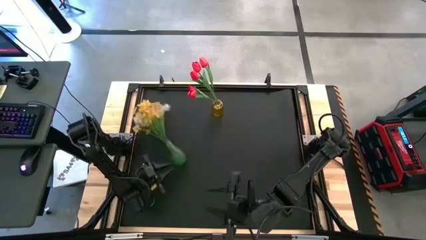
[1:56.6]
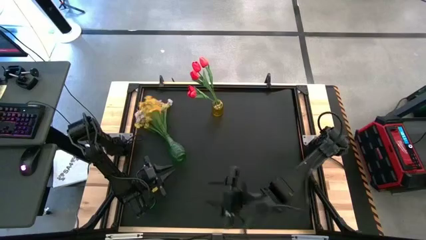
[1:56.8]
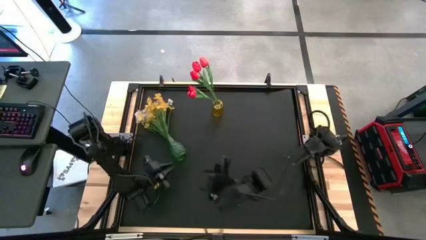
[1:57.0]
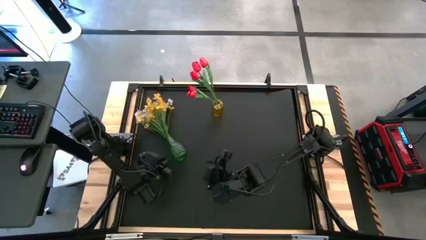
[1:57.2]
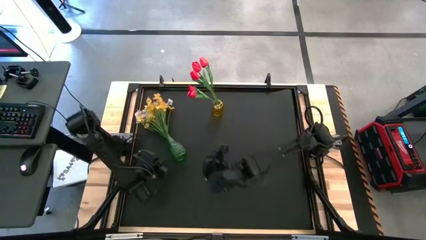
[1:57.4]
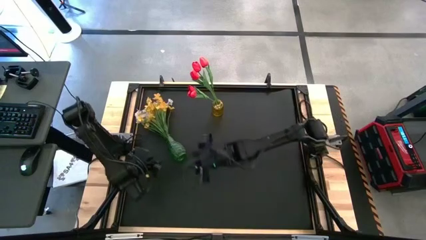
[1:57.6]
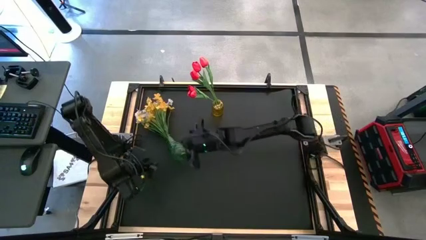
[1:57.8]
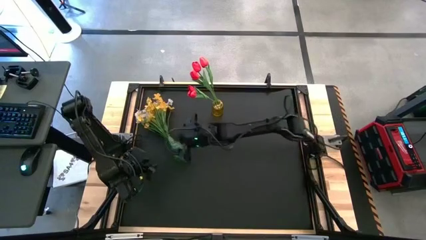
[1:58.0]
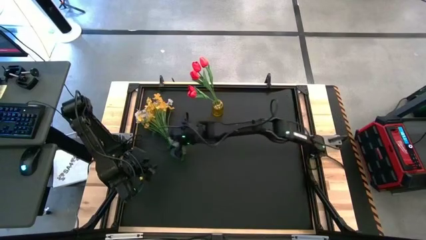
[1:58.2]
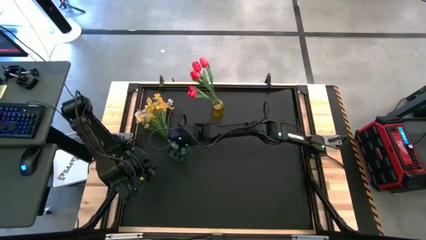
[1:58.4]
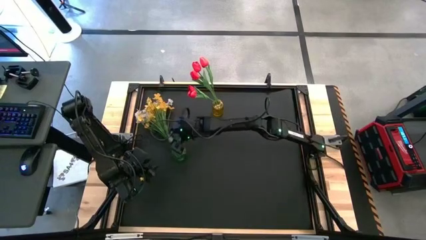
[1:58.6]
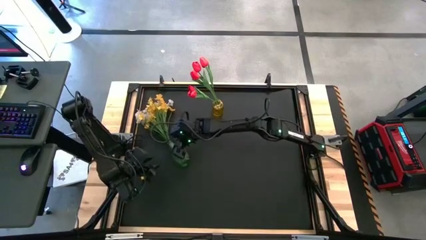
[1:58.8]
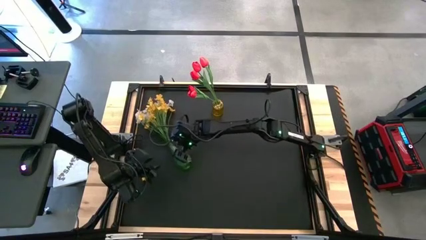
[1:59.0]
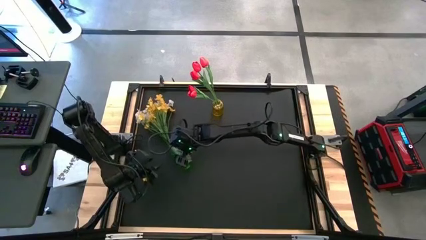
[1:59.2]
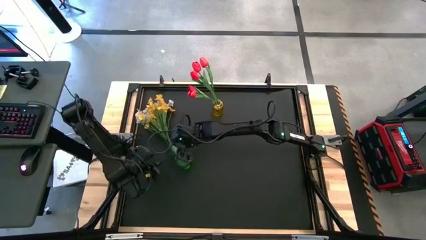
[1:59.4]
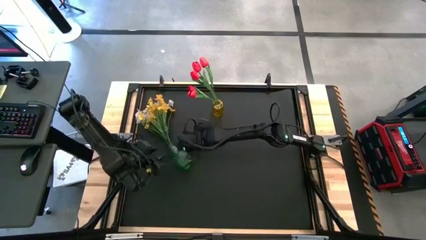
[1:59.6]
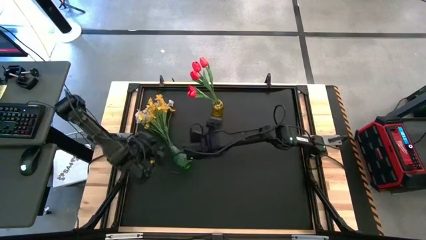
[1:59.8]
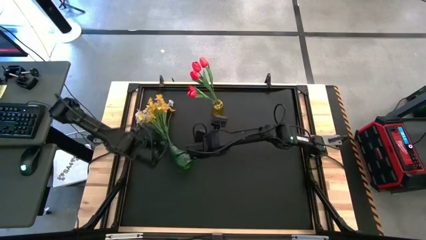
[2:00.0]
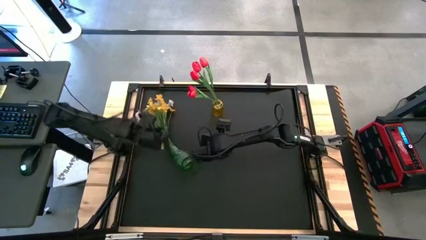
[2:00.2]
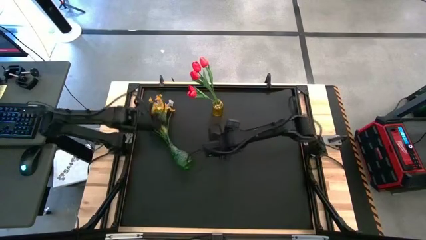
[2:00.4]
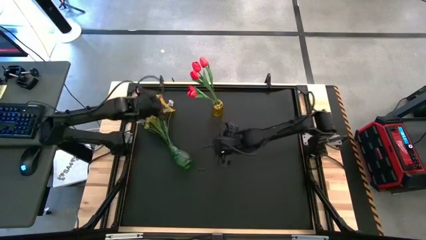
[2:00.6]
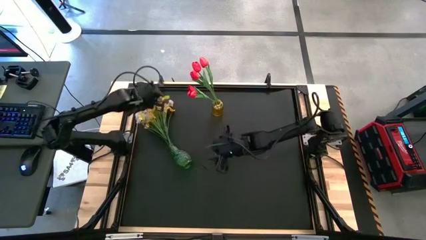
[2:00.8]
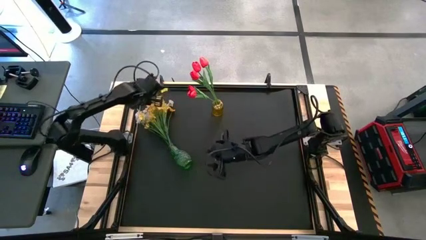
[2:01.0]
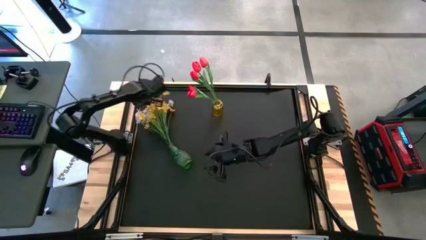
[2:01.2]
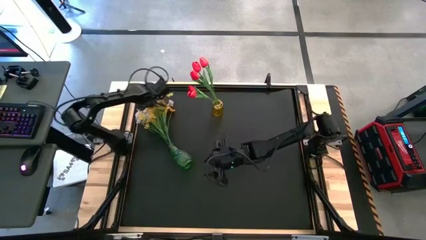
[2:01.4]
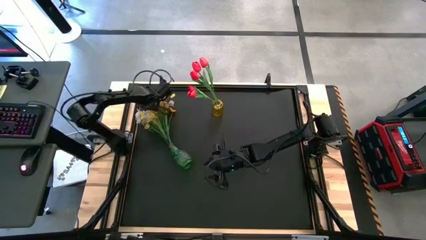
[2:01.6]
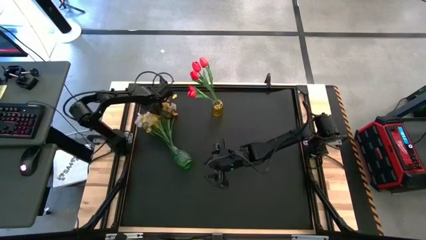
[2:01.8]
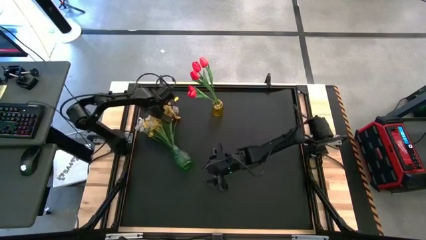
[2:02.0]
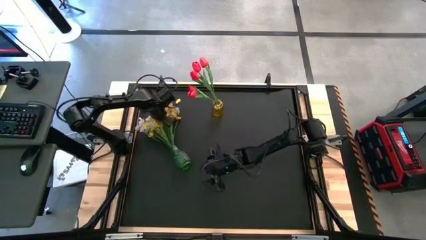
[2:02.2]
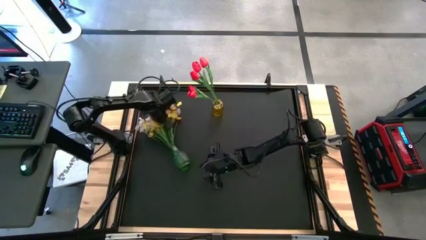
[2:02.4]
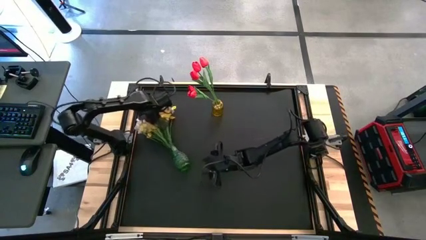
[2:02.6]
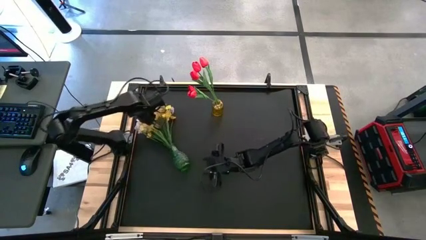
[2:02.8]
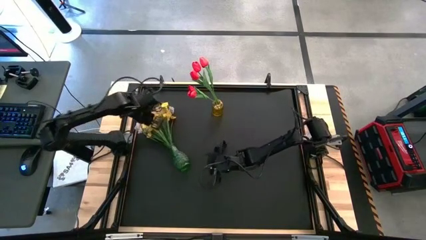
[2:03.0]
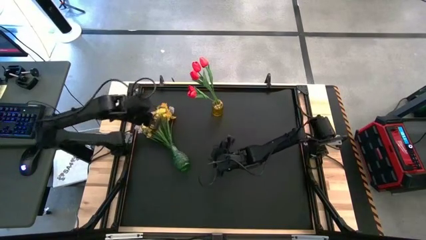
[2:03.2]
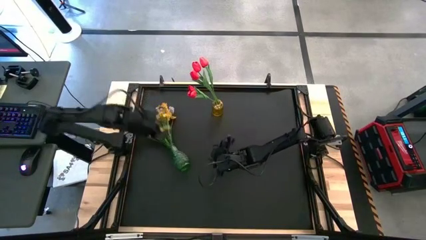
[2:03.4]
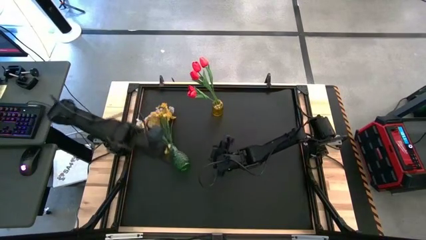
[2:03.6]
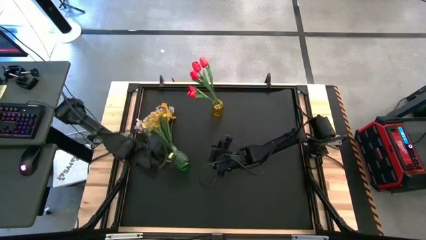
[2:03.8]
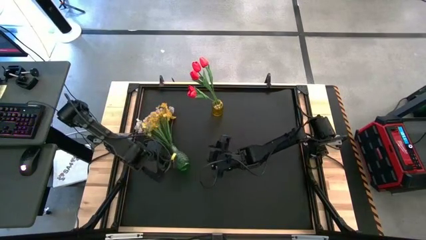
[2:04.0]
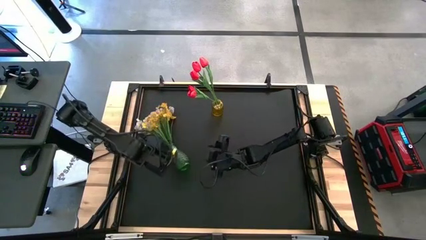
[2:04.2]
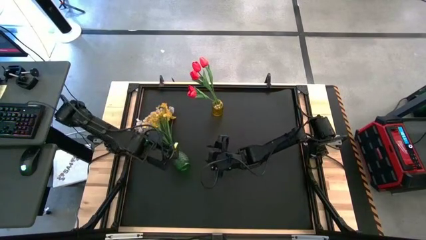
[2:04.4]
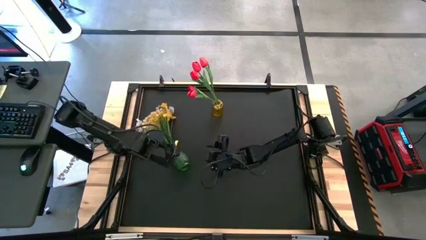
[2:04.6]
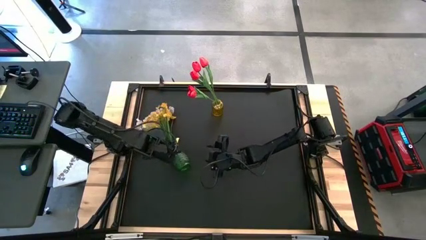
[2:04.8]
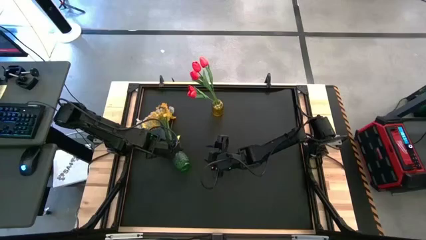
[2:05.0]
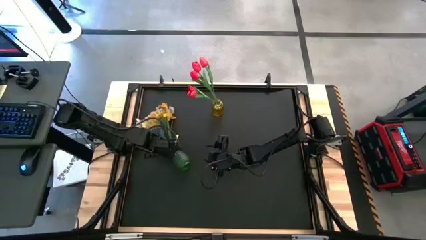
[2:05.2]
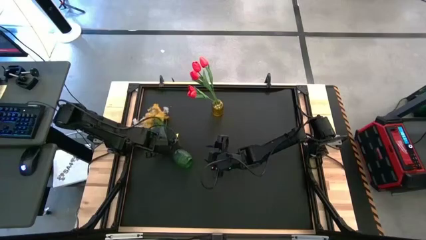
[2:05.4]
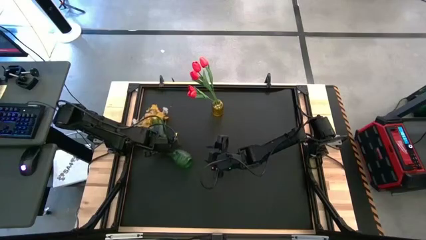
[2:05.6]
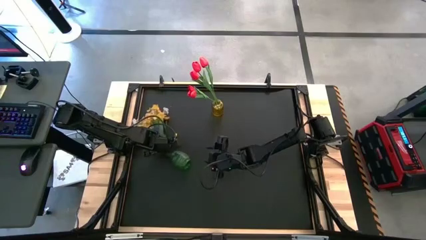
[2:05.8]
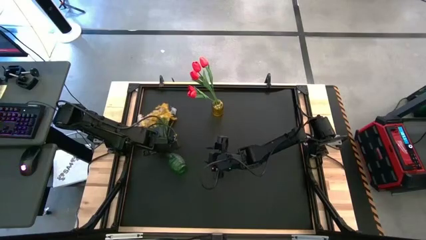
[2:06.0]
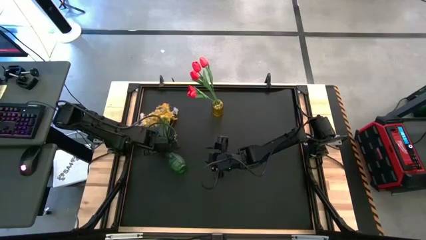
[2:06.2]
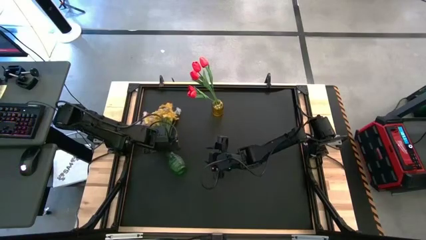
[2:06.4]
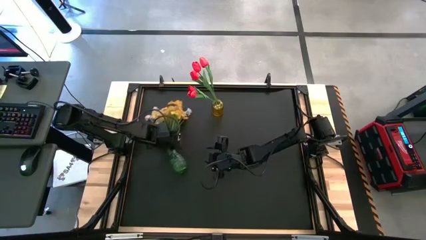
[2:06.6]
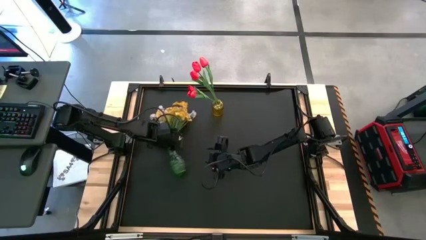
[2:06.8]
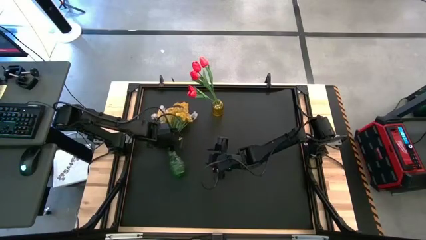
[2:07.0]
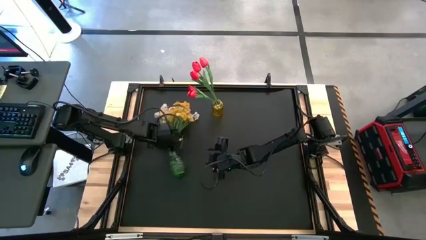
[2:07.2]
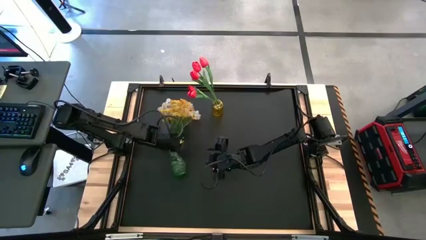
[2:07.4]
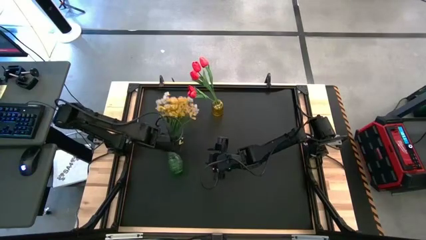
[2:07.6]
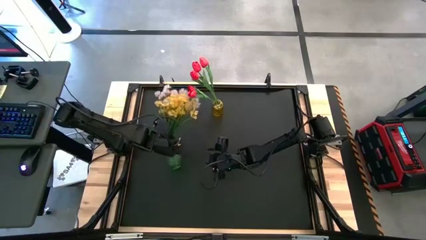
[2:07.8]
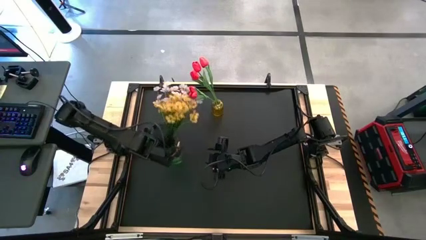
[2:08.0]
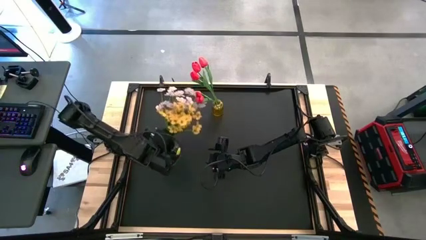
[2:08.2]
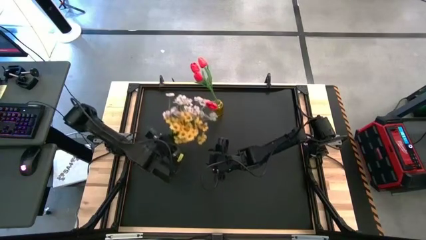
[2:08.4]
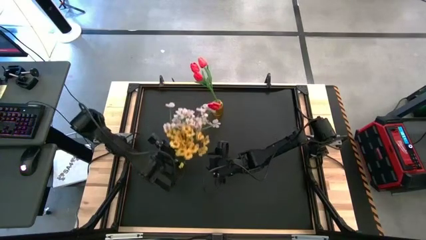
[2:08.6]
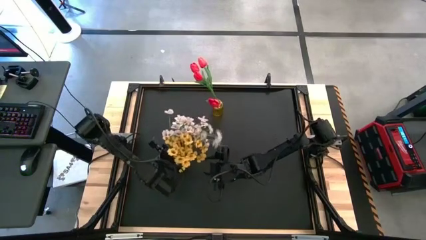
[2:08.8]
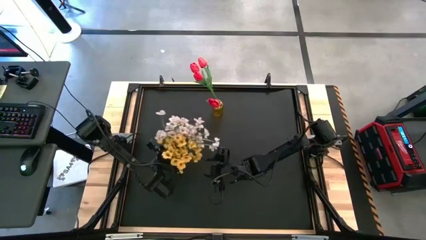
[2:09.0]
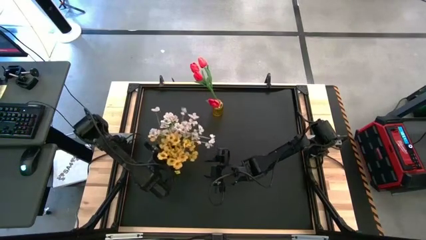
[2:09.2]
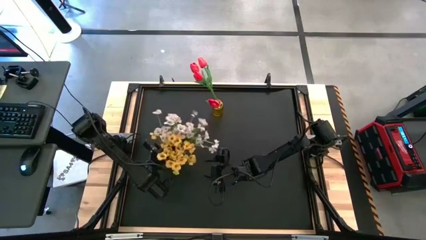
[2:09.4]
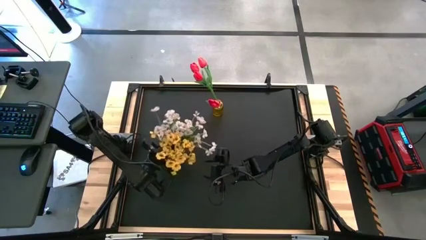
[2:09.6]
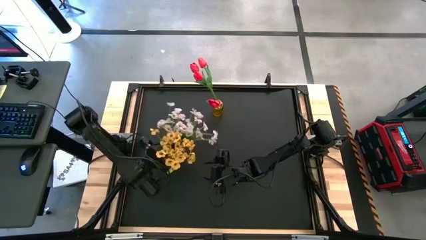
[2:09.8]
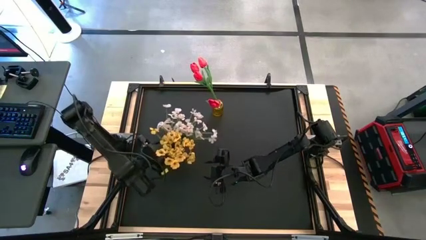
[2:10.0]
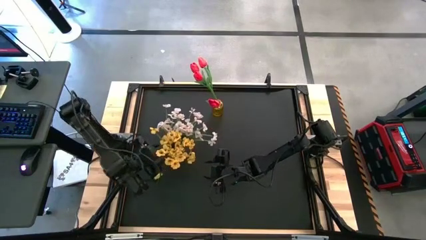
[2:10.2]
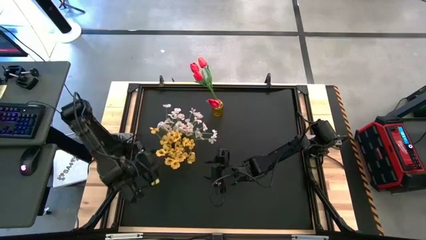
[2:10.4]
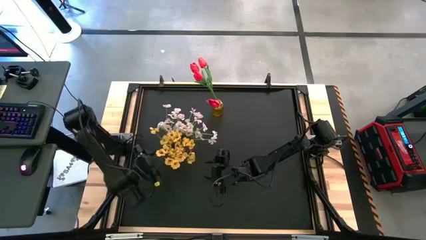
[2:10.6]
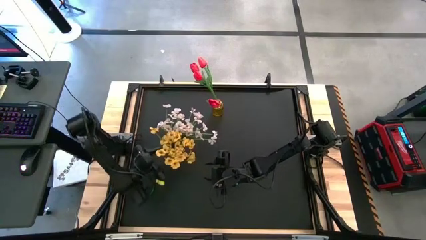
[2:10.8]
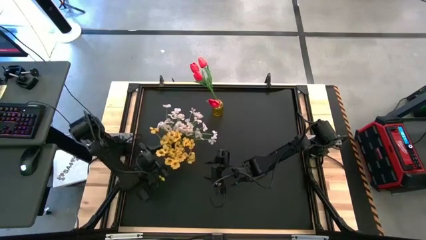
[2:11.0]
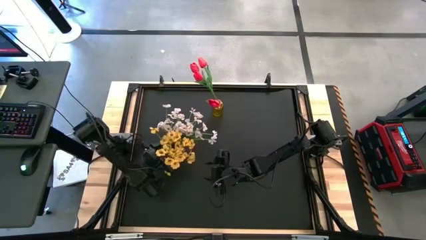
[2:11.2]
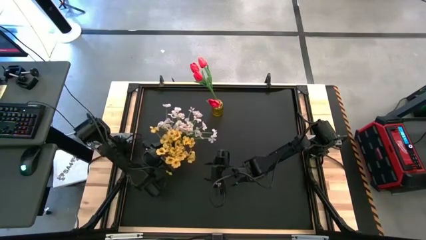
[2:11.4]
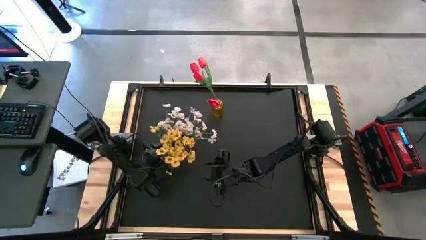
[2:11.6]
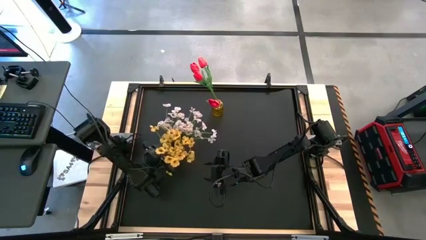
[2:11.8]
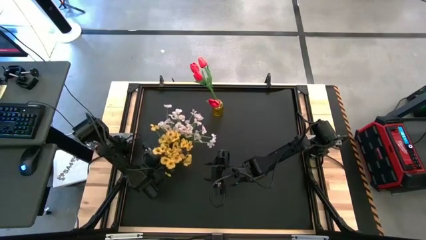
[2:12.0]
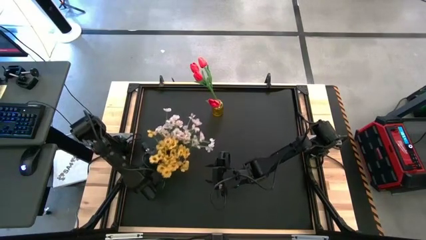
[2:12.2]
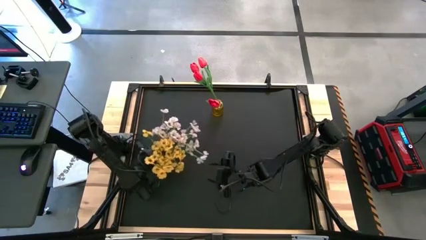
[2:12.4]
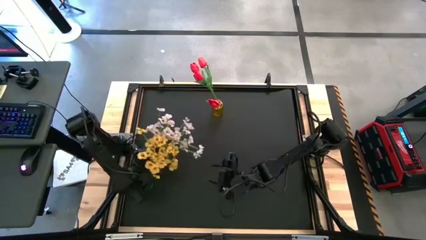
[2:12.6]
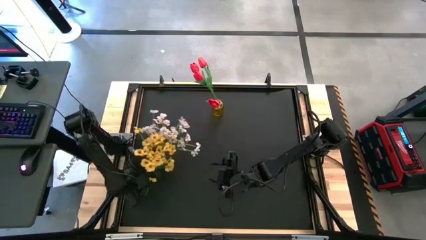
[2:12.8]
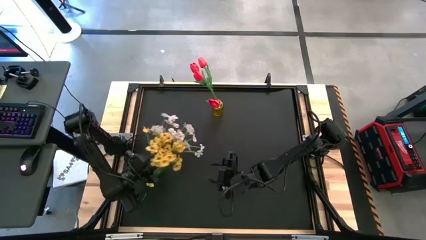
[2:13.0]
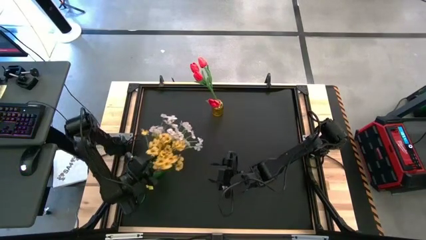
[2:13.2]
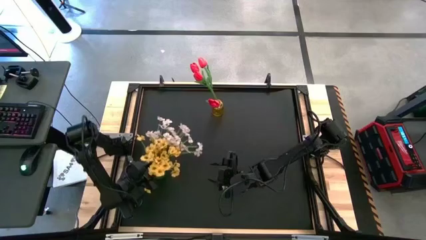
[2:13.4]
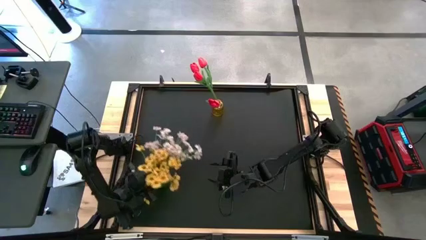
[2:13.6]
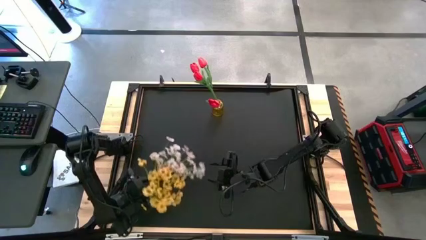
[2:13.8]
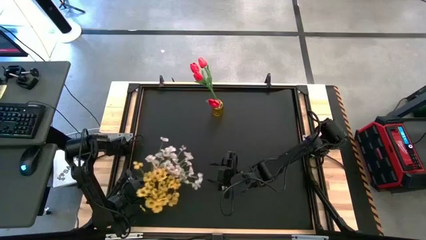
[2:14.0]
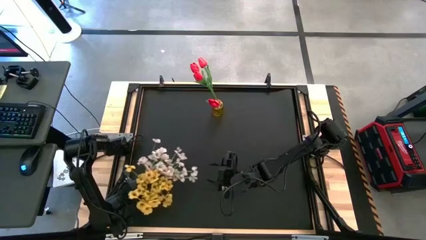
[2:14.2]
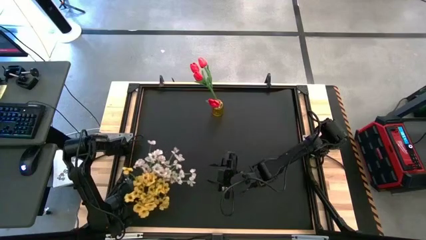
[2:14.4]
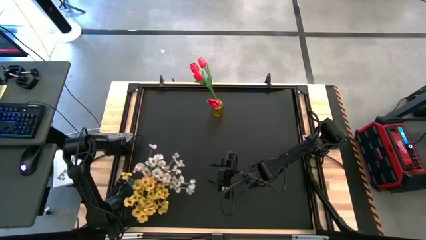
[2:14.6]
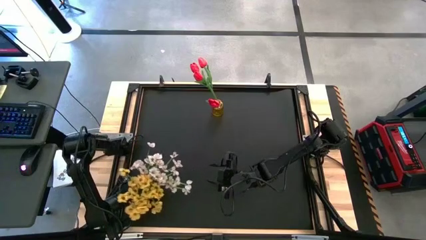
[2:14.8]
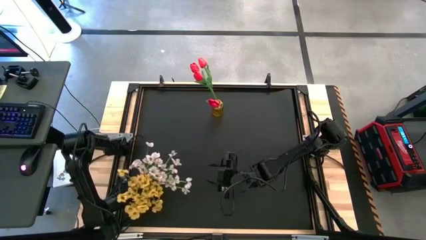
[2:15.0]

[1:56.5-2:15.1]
Task: Sort flowers into vase by color
Adjust the green vase
